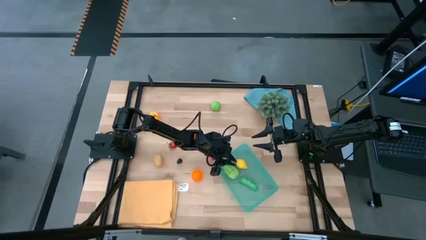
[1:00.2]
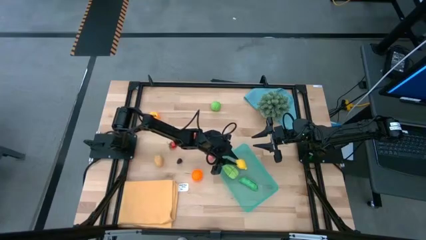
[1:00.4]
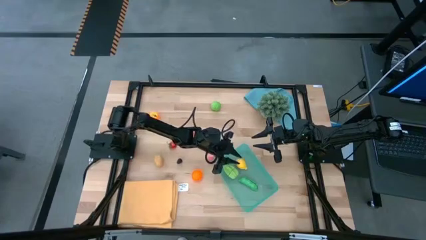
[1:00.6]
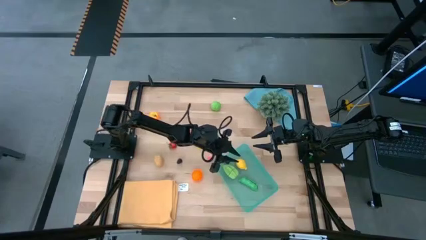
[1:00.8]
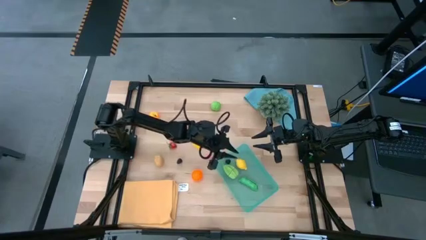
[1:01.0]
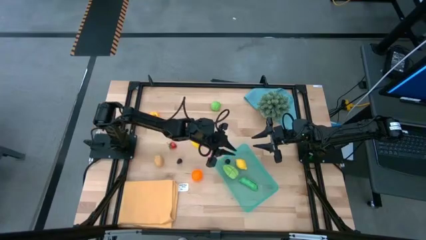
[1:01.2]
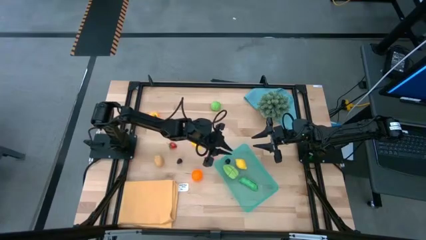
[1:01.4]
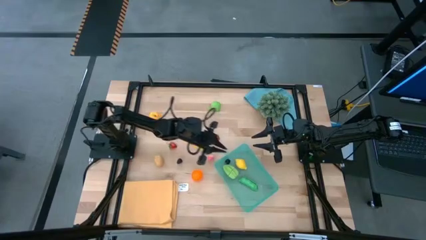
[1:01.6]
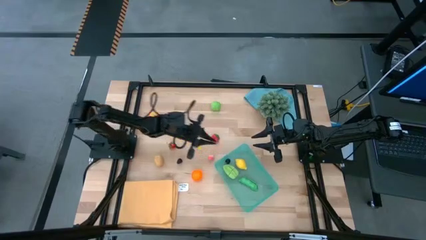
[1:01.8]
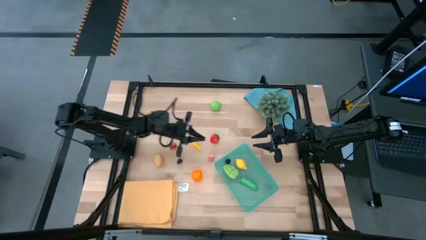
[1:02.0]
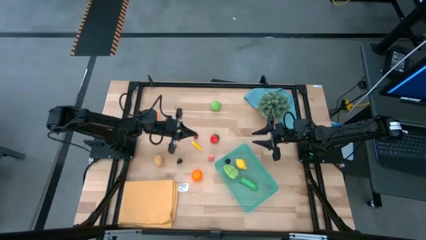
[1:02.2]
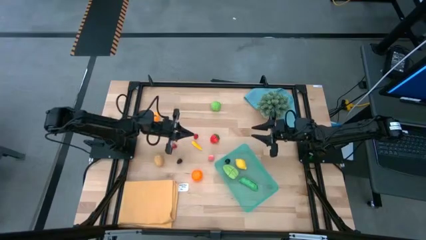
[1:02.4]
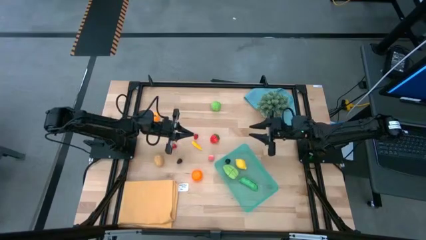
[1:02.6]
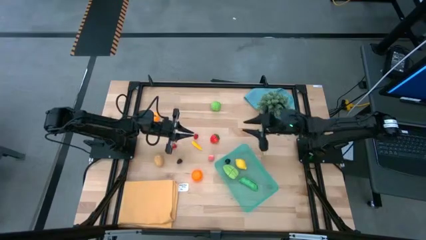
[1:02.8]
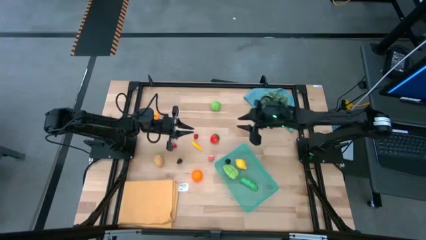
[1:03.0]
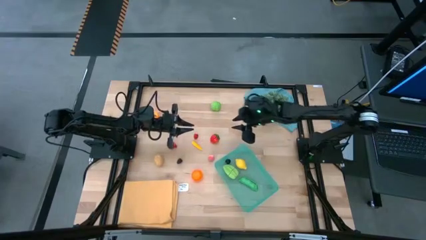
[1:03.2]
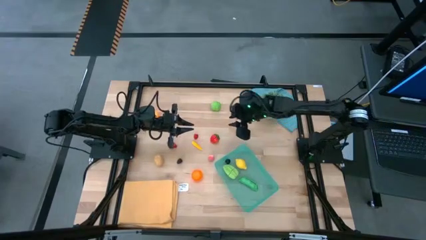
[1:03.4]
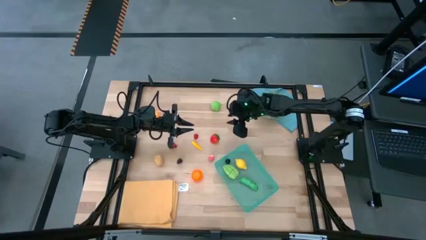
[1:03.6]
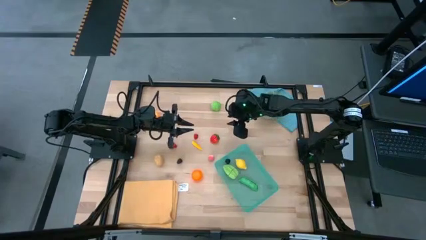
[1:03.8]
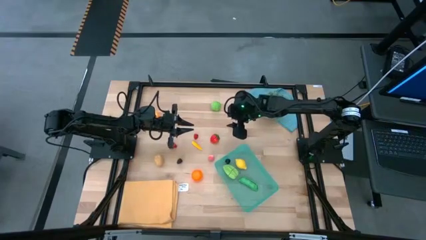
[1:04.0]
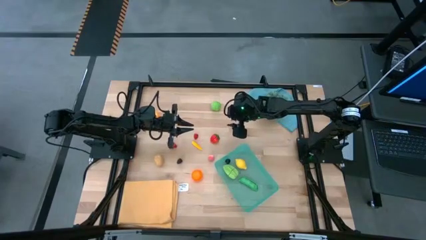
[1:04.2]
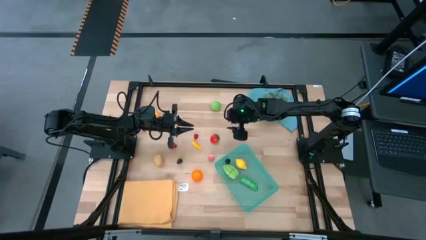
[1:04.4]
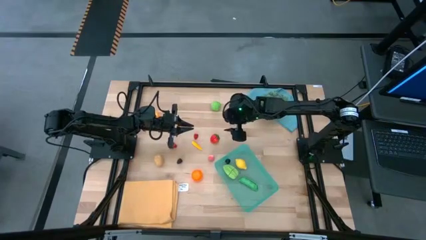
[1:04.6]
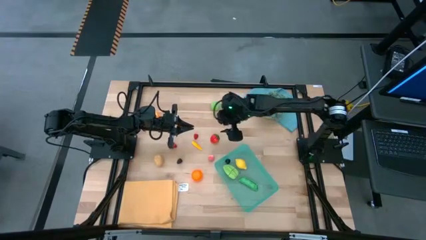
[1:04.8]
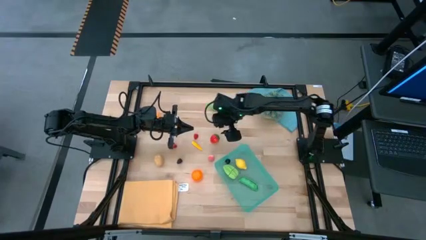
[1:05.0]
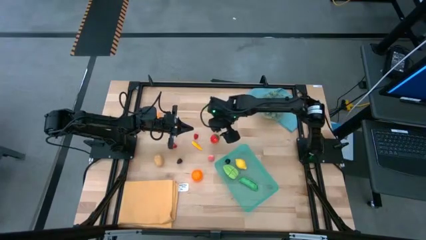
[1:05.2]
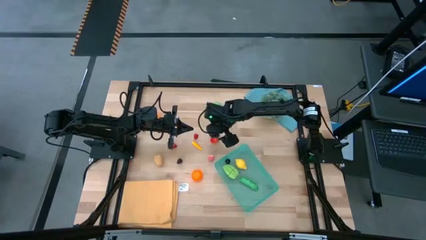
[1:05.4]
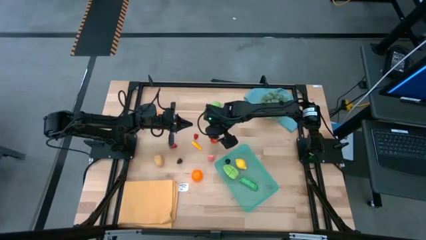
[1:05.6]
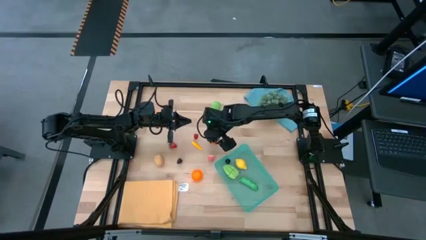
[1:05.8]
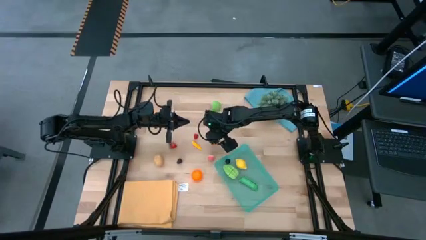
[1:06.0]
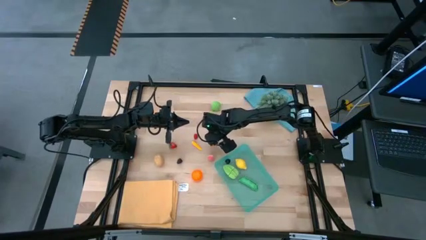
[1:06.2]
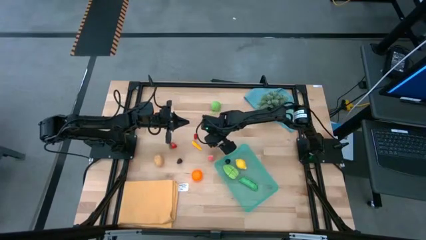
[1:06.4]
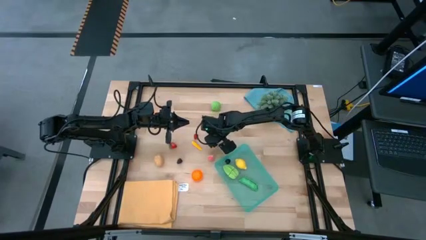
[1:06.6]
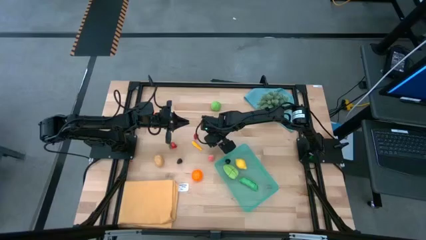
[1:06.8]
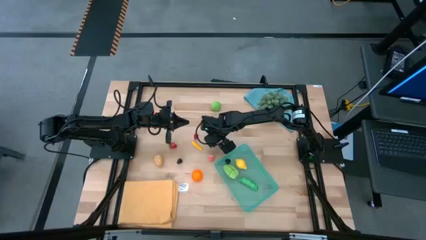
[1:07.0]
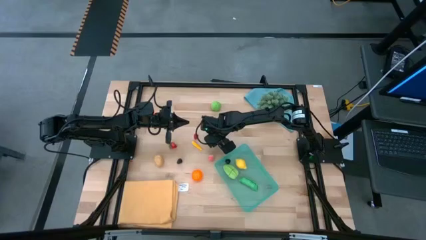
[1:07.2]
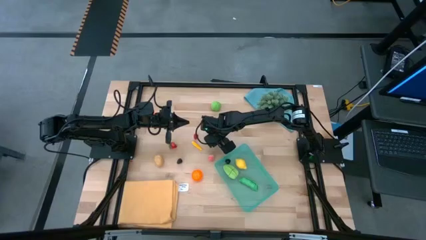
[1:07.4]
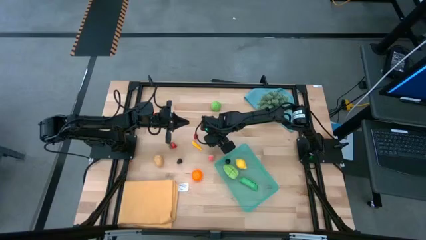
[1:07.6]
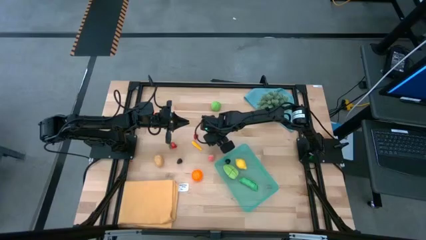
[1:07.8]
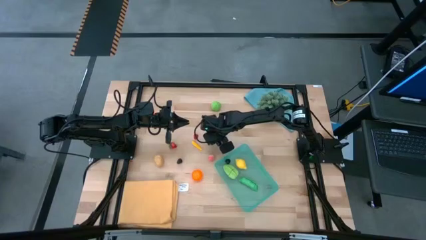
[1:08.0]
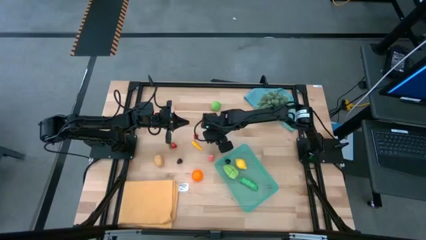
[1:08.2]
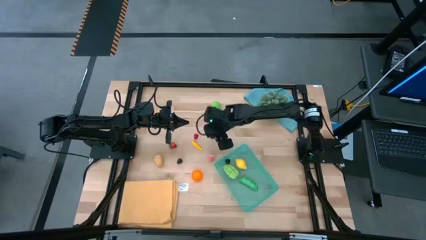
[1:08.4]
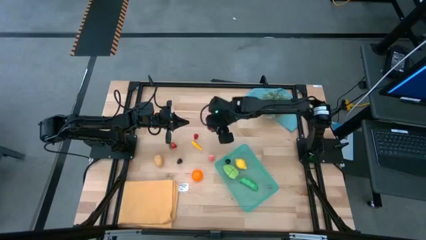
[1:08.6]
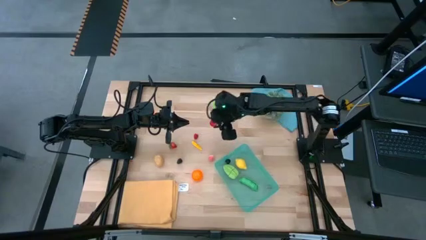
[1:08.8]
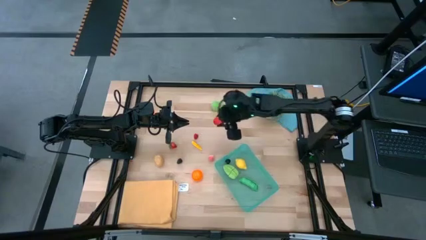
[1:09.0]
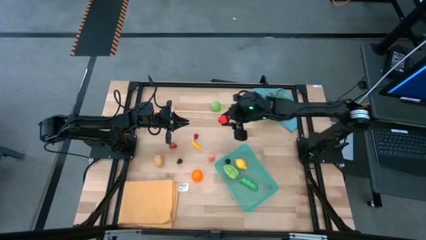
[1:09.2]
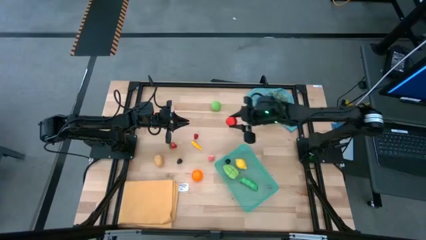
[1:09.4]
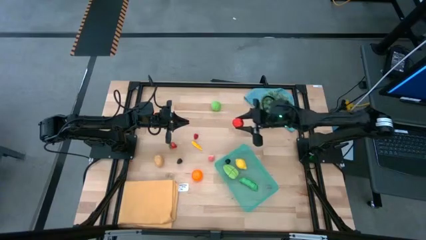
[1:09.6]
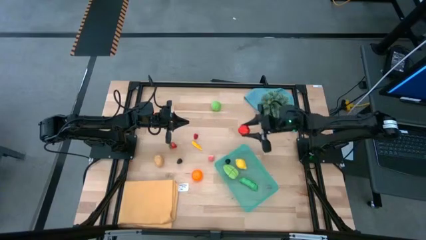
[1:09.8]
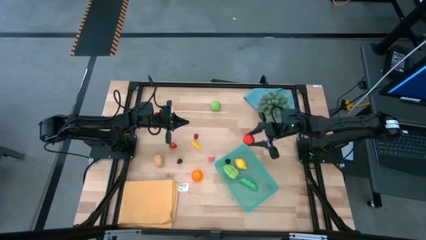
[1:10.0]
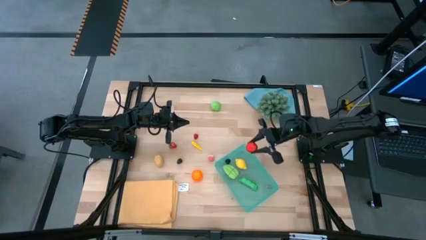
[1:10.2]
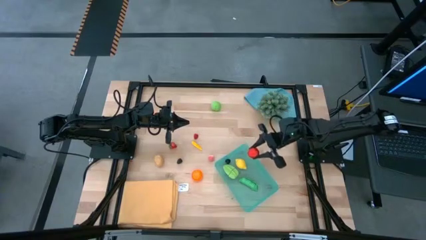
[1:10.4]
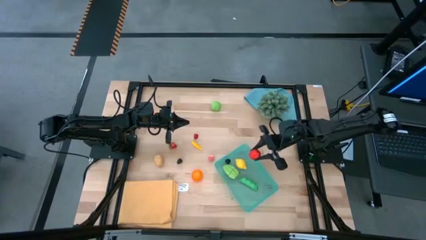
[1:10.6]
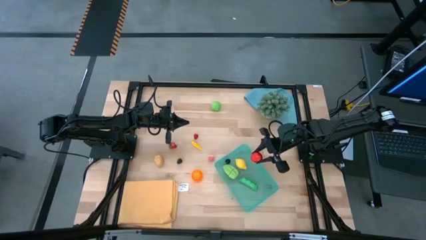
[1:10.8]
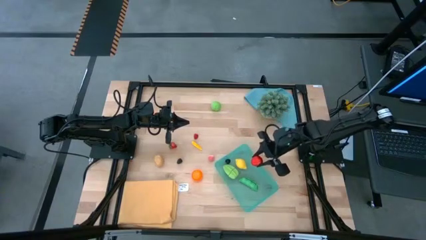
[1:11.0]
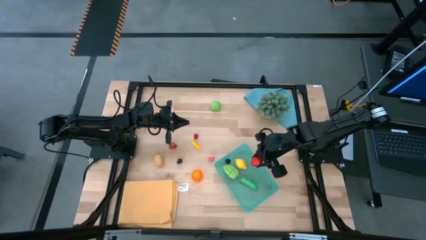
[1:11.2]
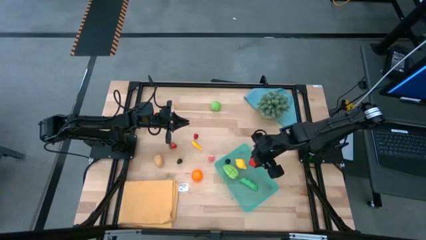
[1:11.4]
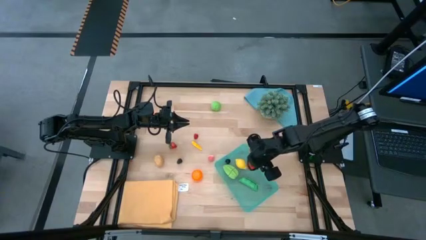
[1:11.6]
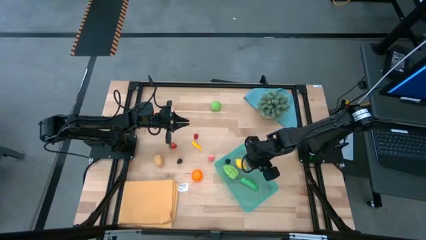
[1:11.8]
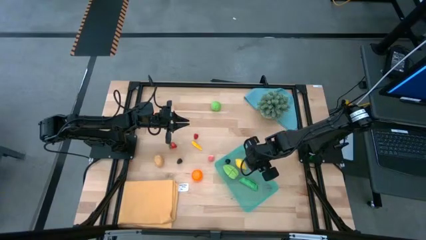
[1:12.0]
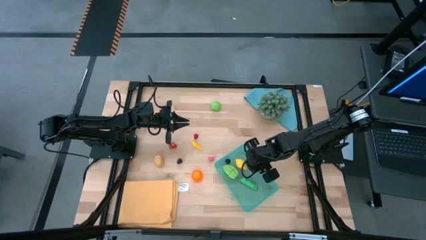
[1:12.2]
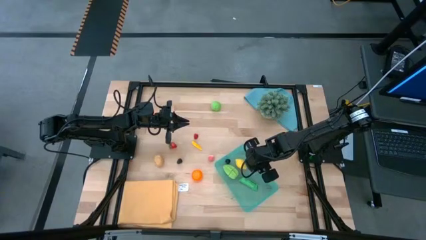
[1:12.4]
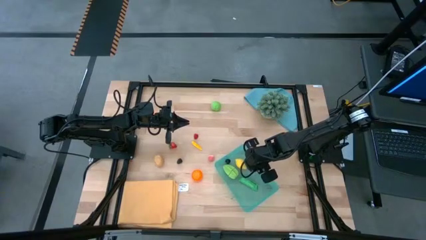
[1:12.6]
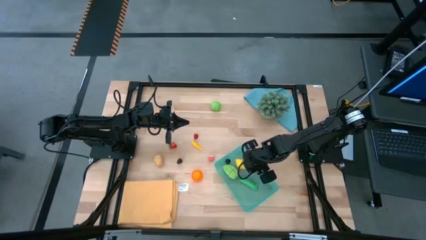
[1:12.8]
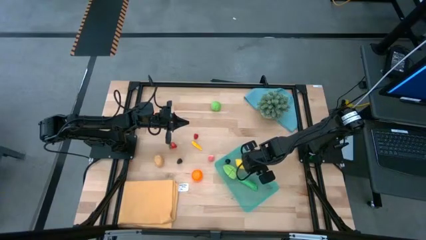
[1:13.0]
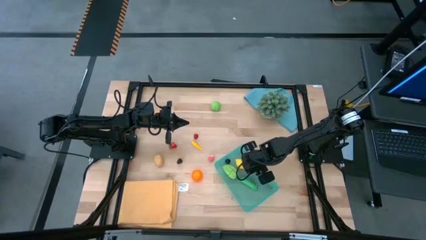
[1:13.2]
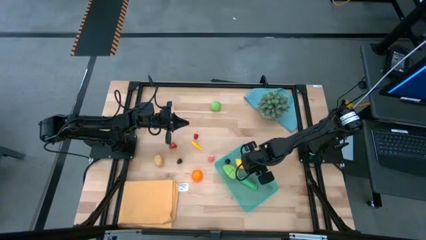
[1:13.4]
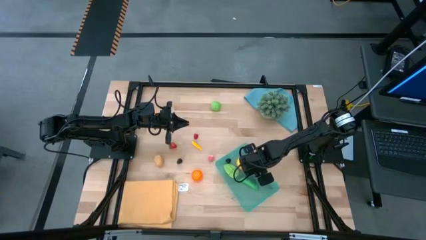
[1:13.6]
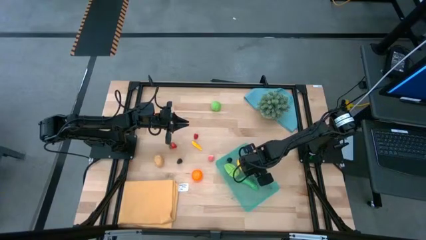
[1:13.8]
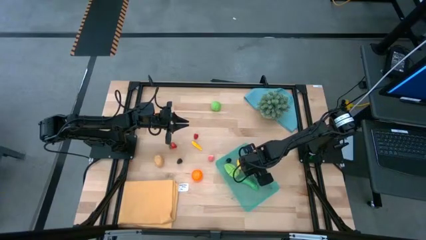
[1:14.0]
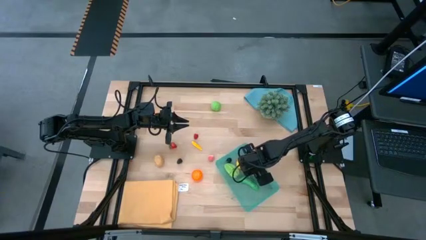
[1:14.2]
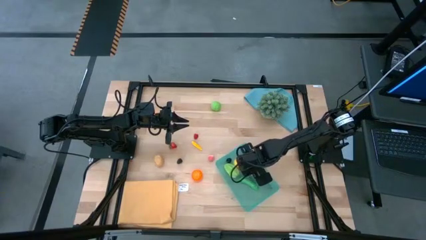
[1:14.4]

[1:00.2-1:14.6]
Task: Pick and placing Produce into tupperware
Put the right strawberry into the green bin

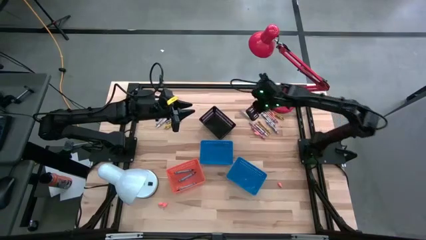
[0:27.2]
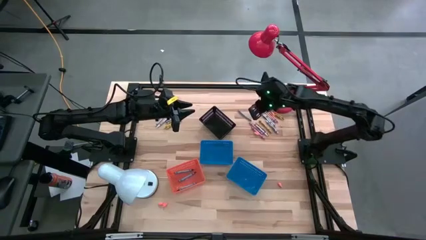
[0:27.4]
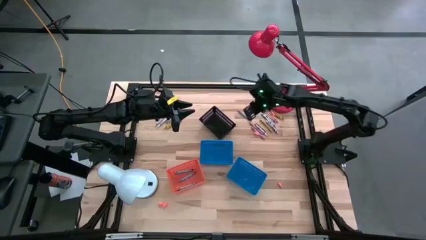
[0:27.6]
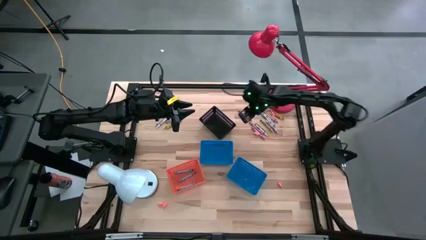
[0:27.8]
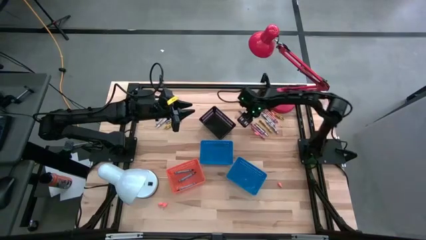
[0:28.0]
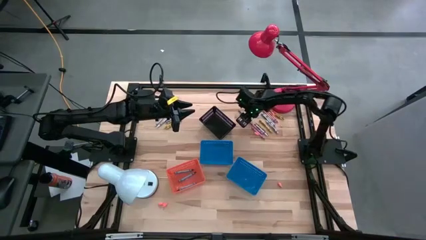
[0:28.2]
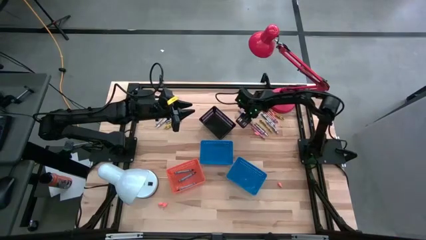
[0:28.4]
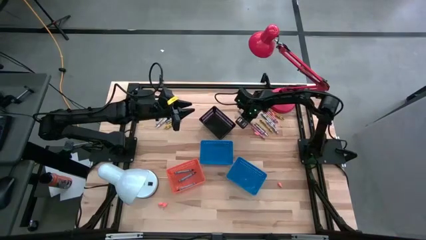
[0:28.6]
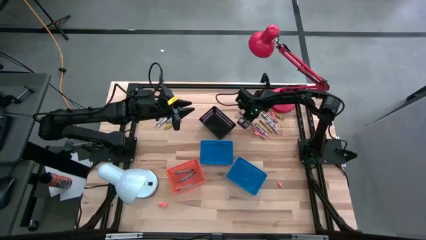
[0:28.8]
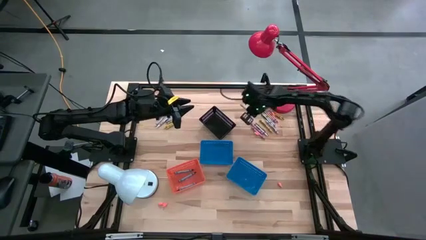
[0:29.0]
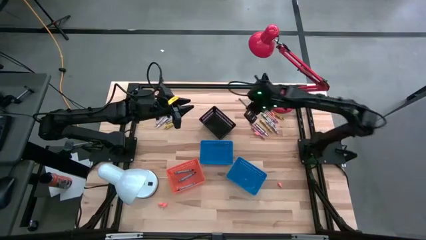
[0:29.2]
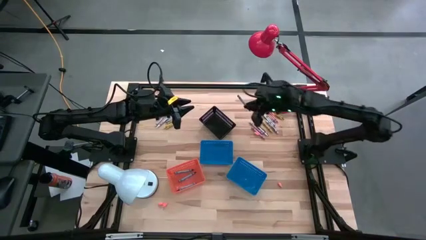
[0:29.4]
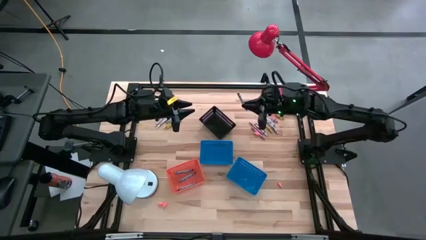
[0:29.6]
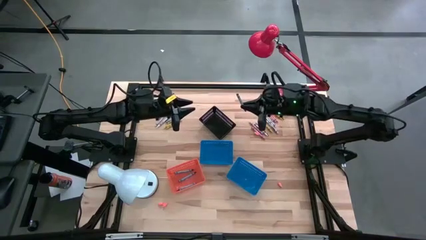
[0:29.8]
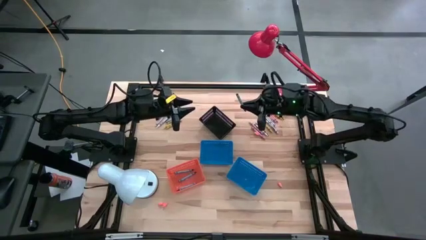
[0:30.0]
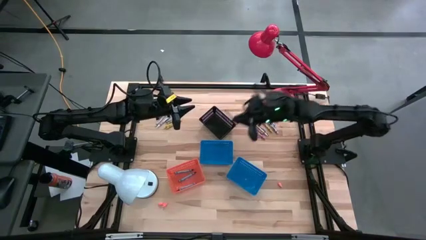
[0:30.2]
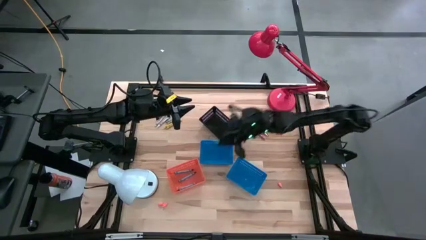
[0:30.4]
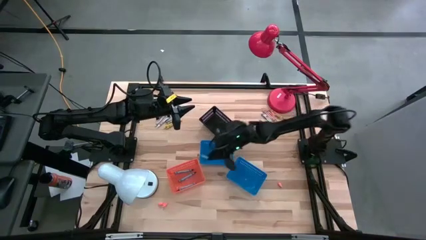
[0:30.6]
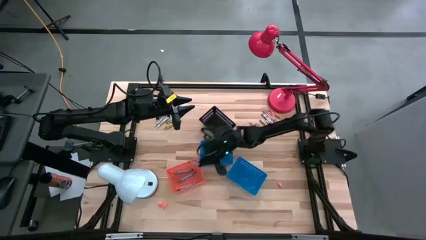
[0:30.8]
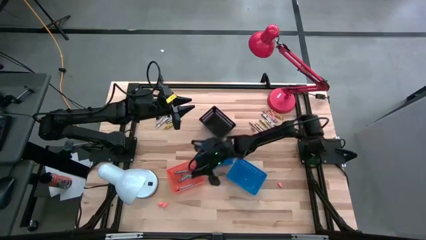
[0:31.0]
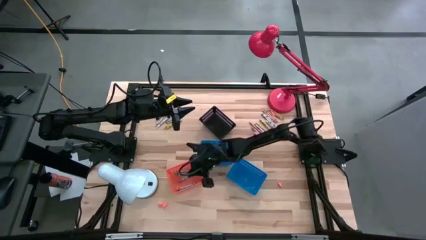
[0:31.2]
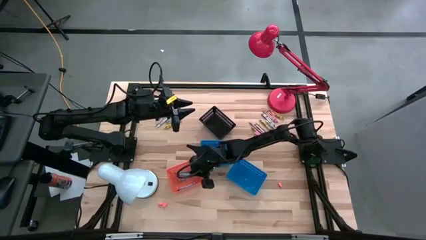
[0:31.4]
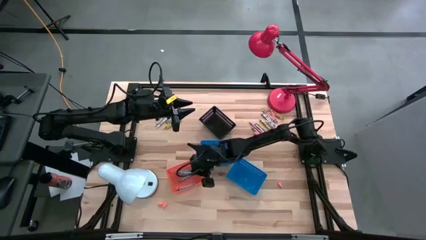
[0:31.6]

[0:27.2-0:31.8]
Task: Sort crayons
Put the blue/green crayon into the orange bin
